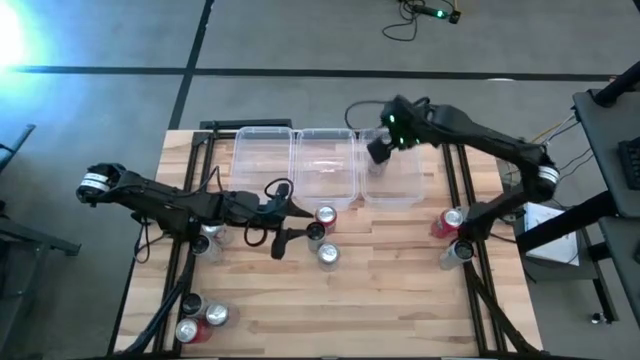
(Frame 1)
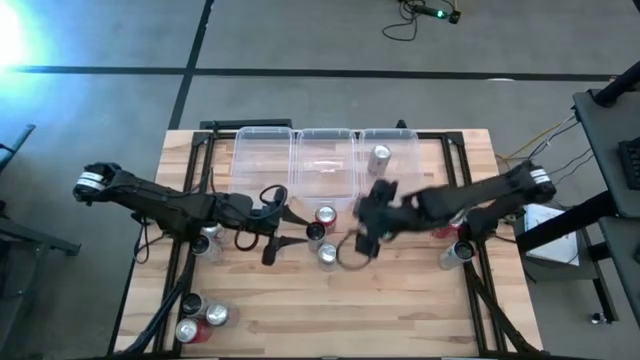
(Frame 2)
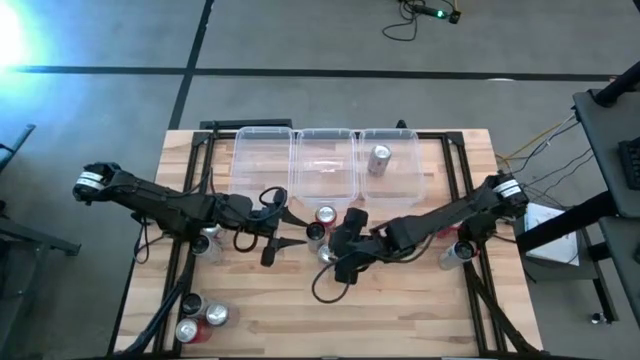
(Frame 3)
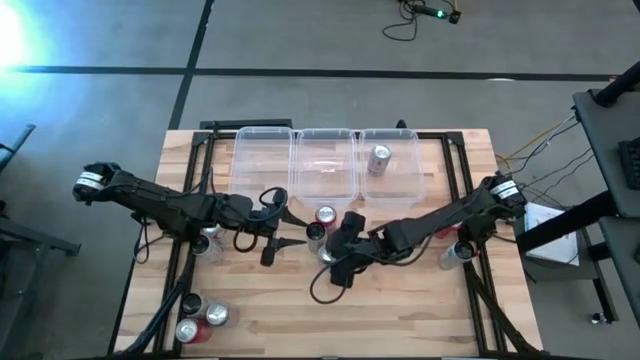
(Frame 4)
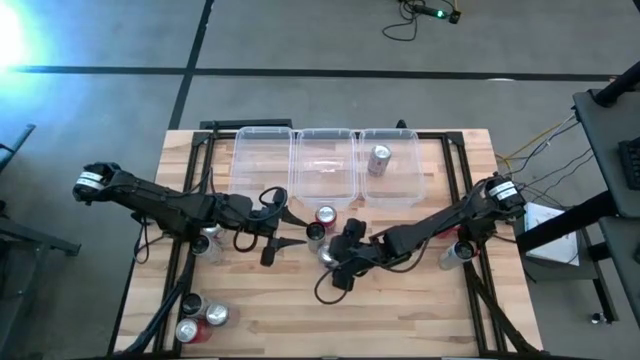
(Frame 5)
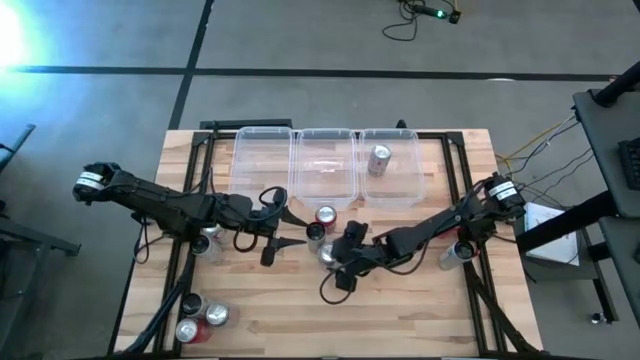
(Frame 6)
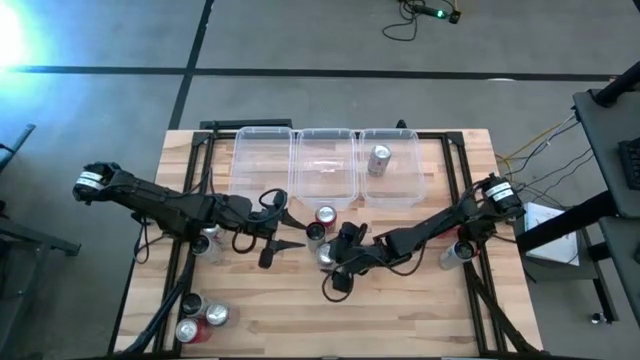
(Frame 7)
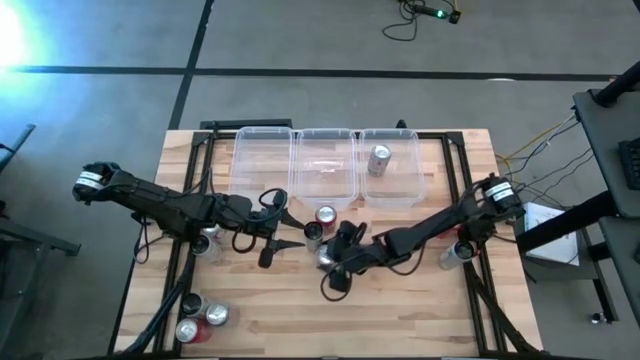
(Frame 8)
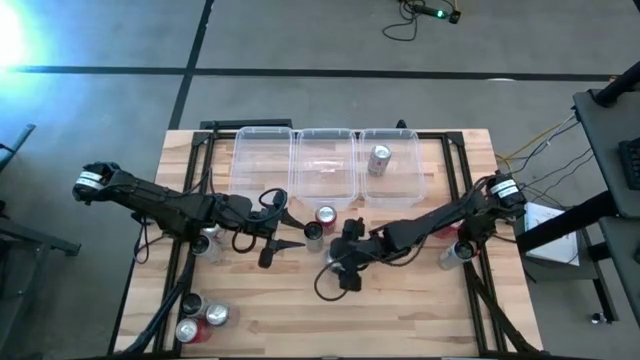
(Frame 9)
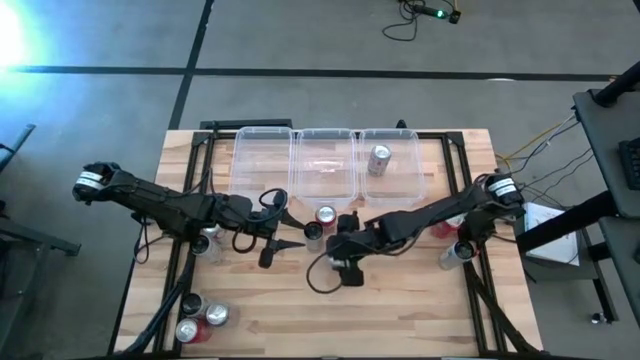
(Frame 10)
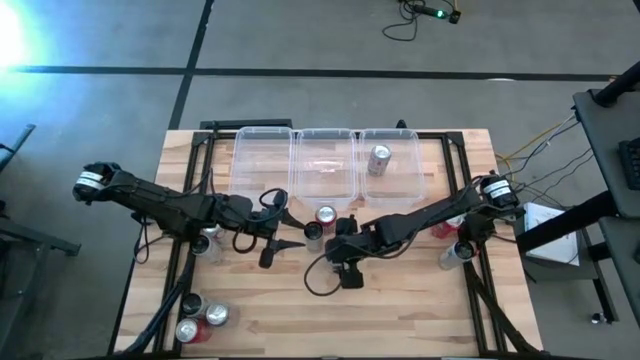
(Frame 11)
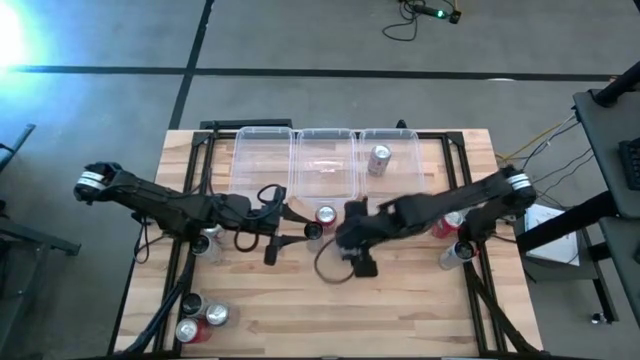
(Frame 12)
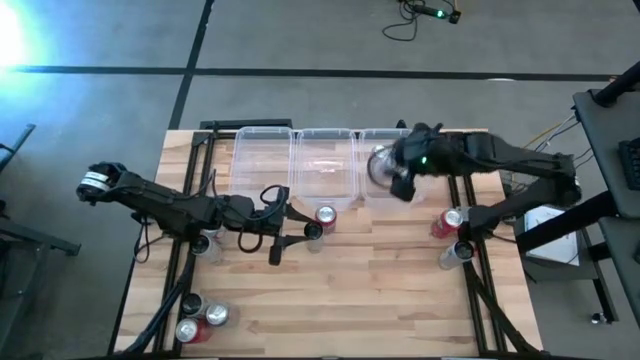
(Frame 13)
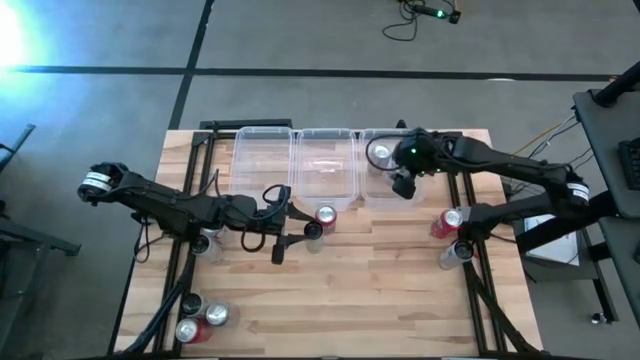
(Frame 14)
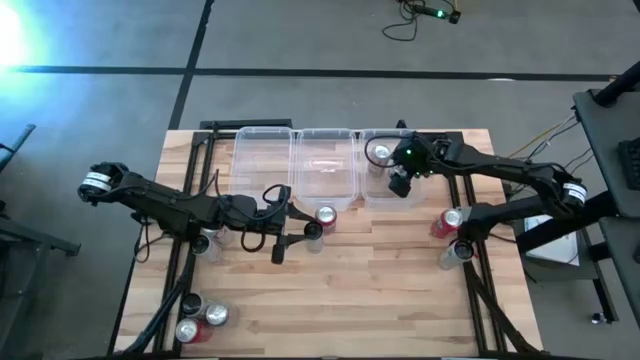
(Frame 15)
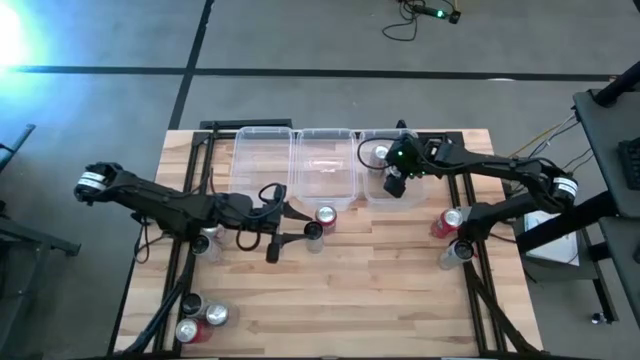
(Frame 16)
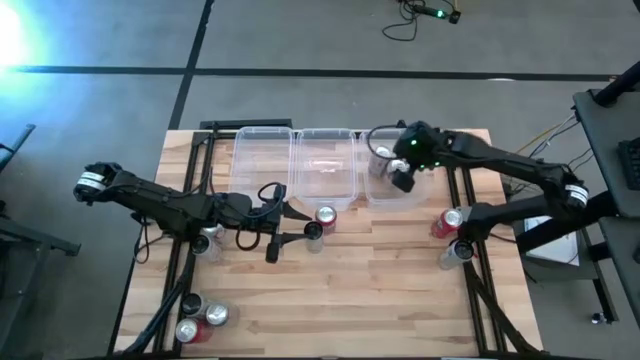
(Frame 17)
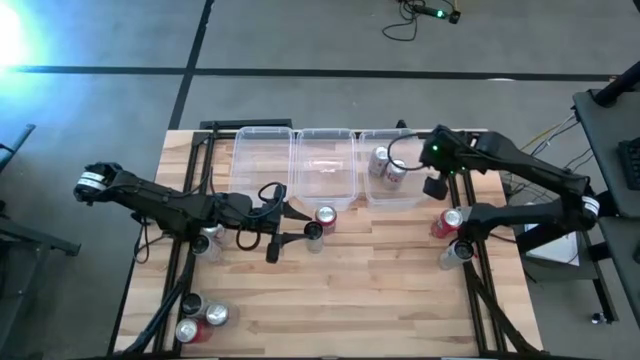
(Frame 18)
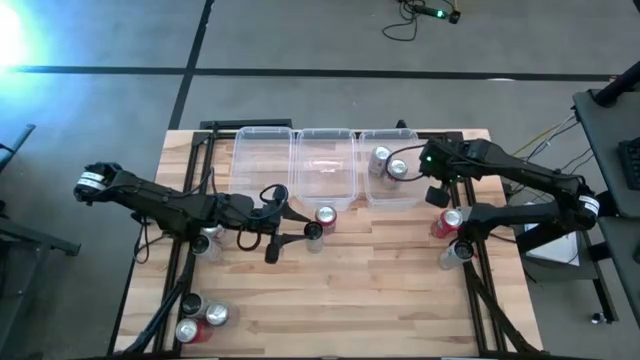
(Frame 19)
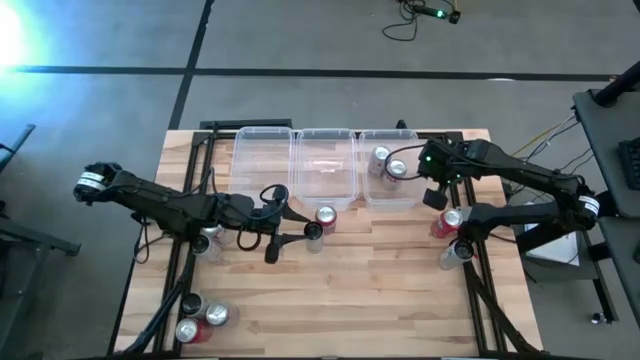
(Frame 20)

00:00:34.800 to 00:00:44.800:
Task: Sort soda cans
Put the top right red silver soda can into the right transparent bin

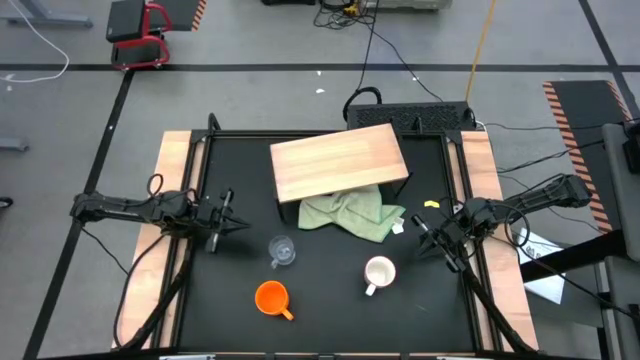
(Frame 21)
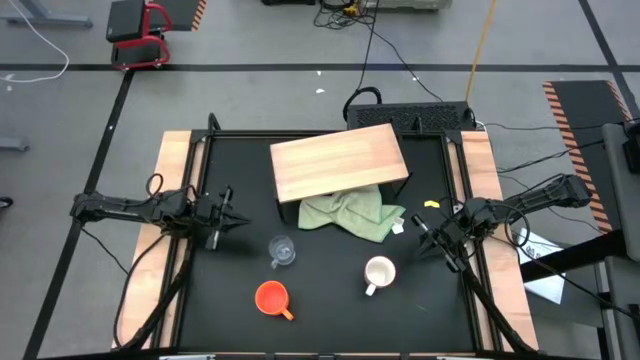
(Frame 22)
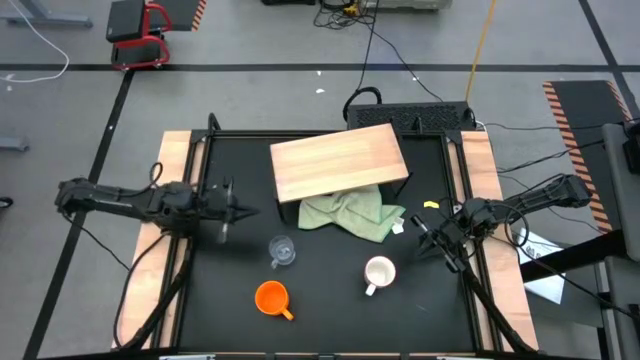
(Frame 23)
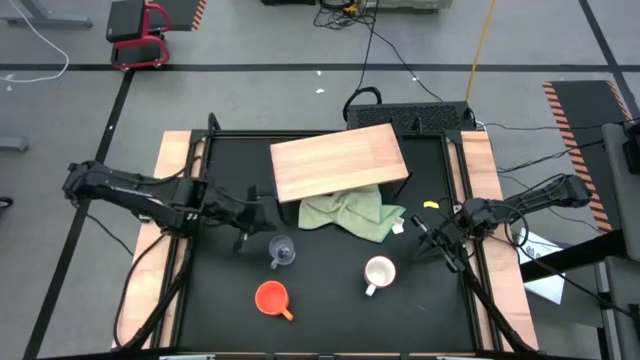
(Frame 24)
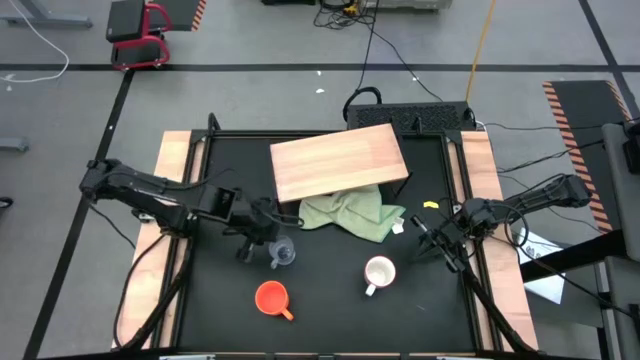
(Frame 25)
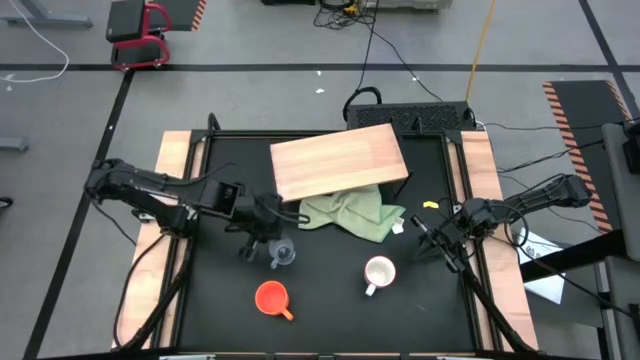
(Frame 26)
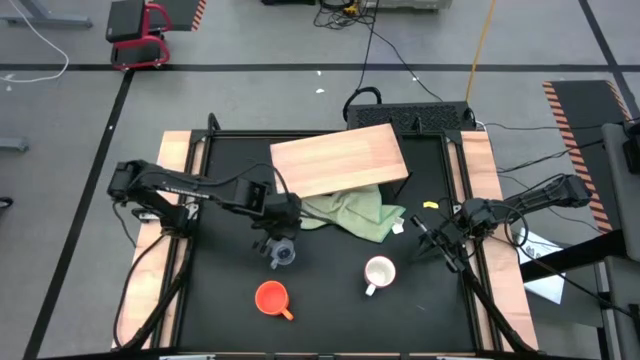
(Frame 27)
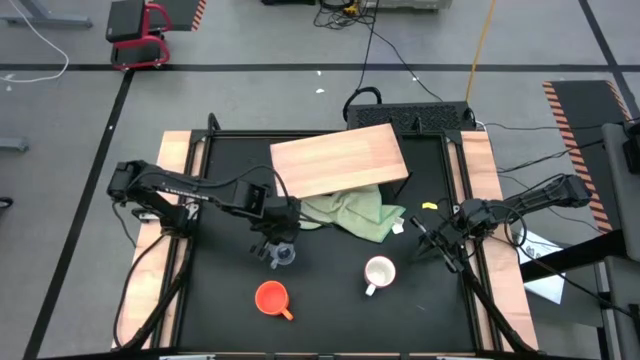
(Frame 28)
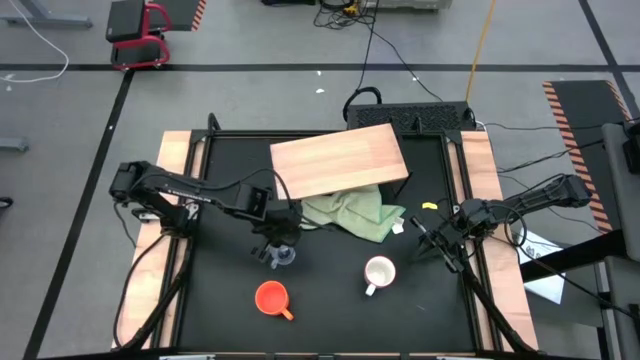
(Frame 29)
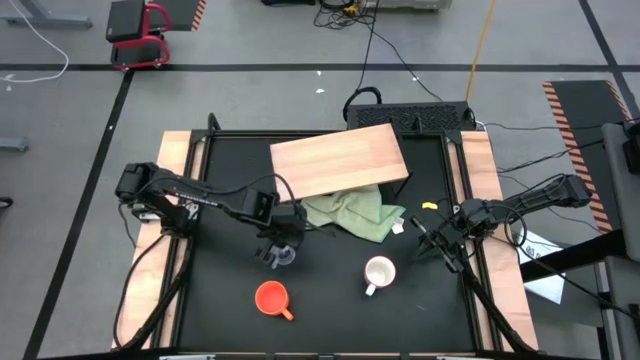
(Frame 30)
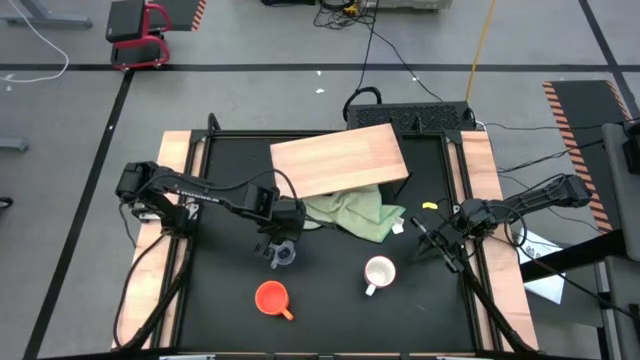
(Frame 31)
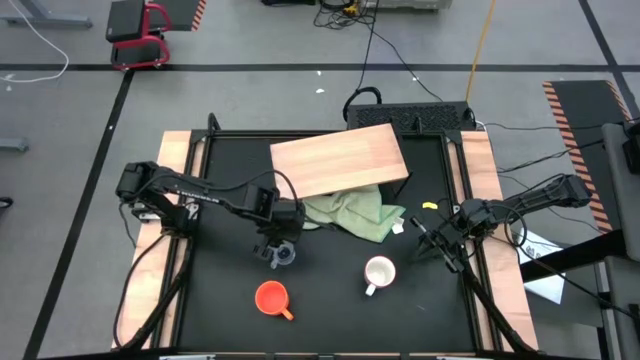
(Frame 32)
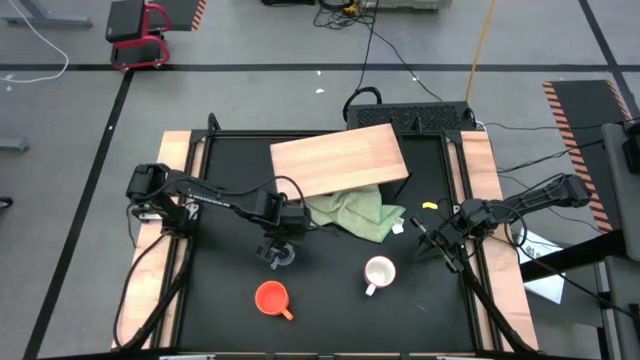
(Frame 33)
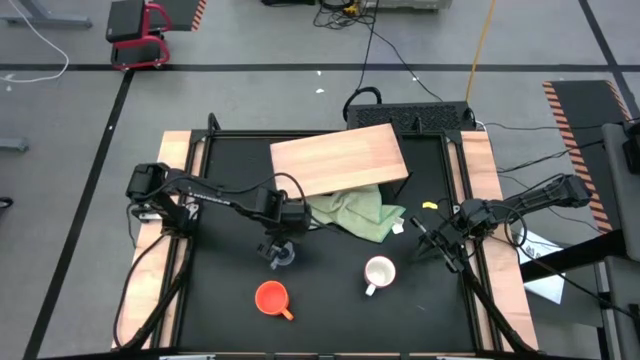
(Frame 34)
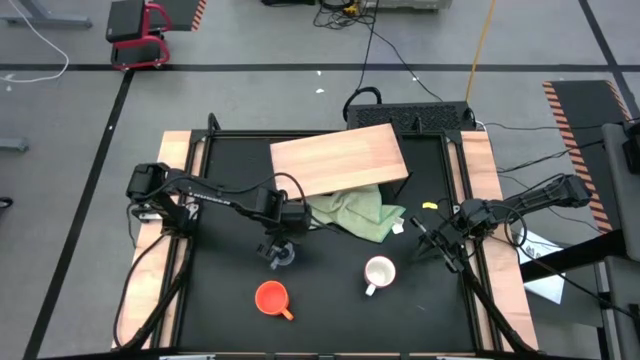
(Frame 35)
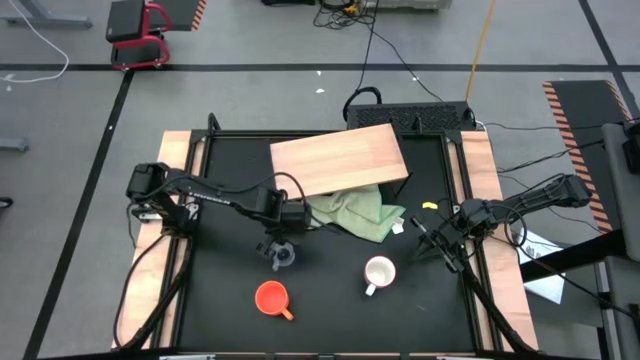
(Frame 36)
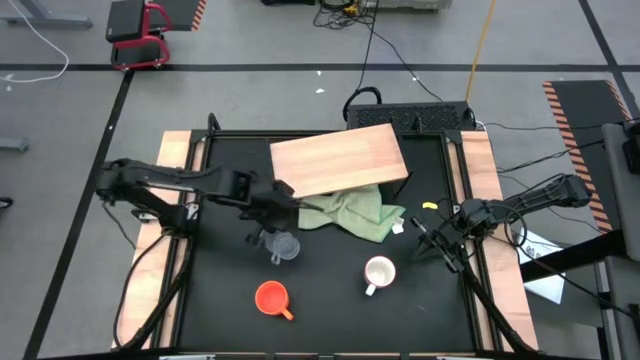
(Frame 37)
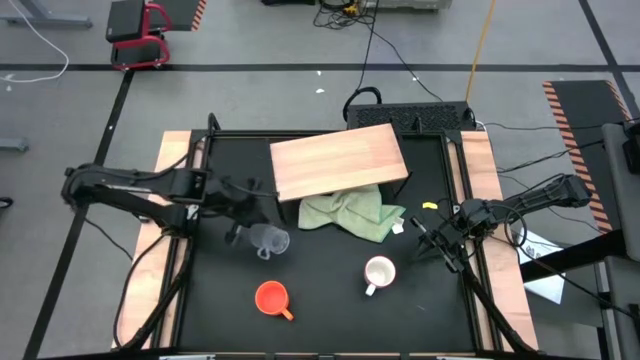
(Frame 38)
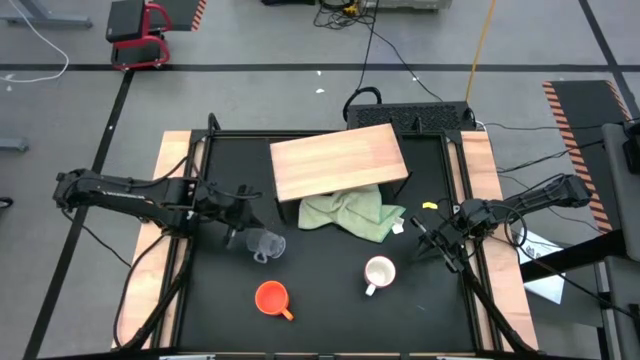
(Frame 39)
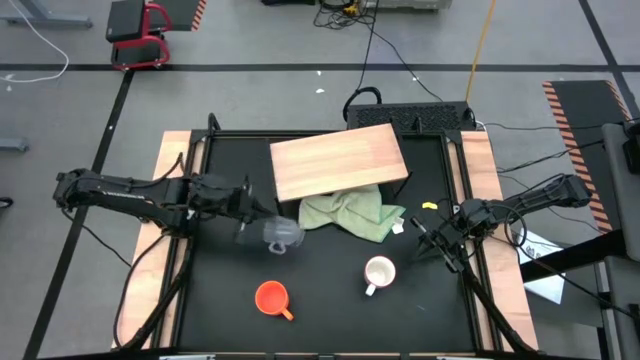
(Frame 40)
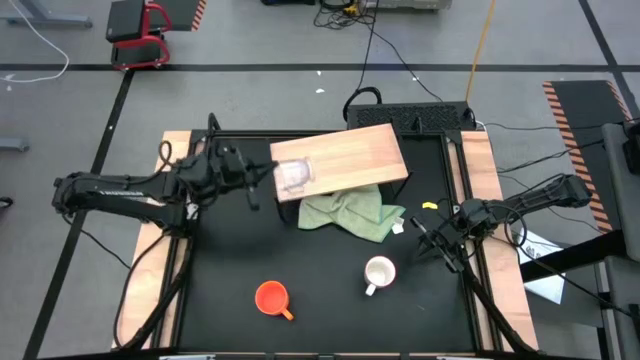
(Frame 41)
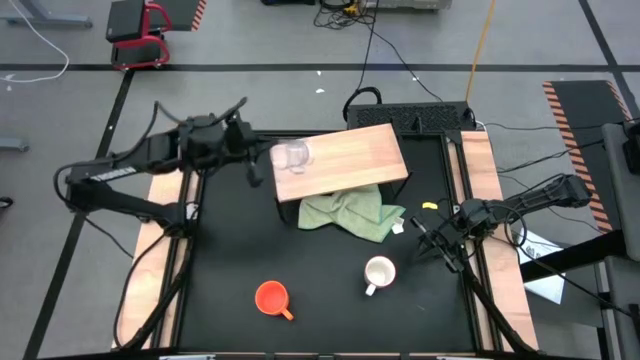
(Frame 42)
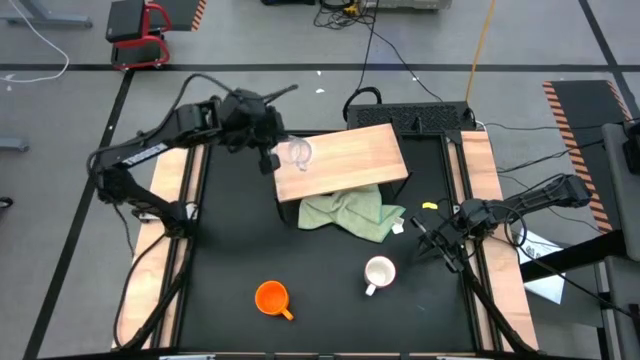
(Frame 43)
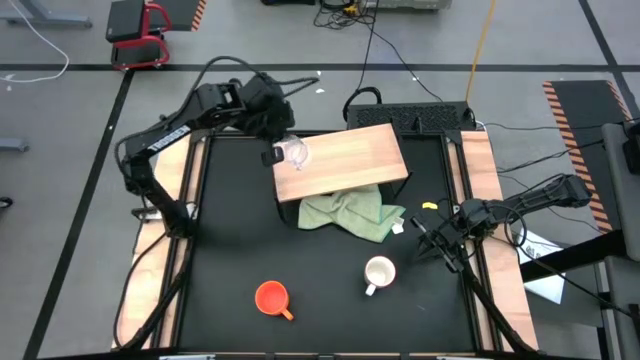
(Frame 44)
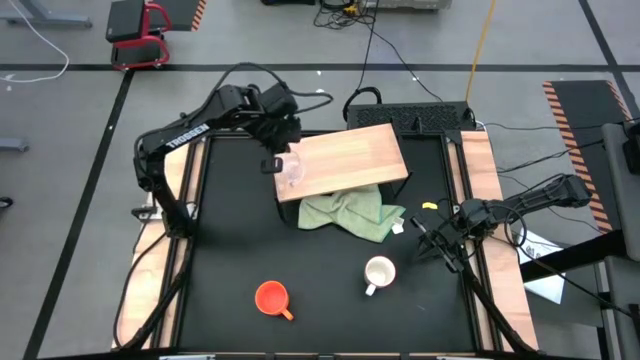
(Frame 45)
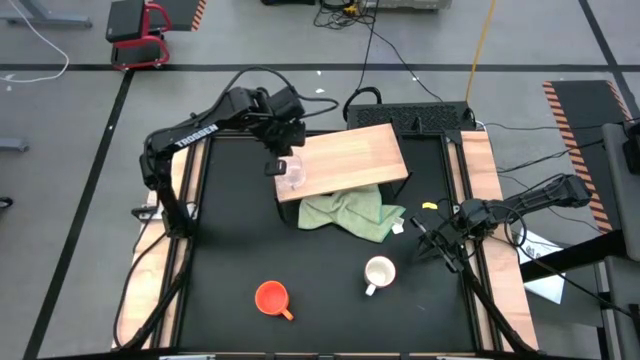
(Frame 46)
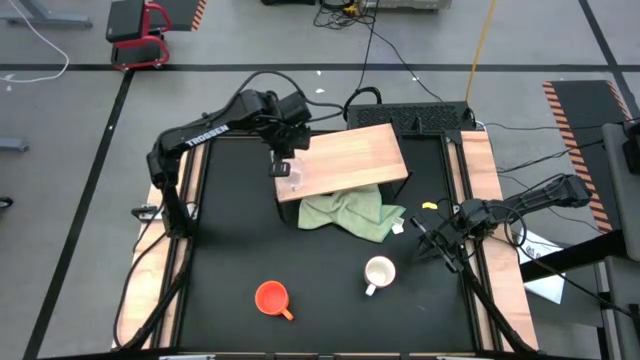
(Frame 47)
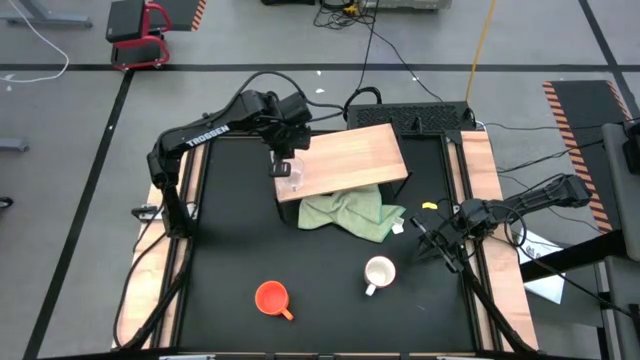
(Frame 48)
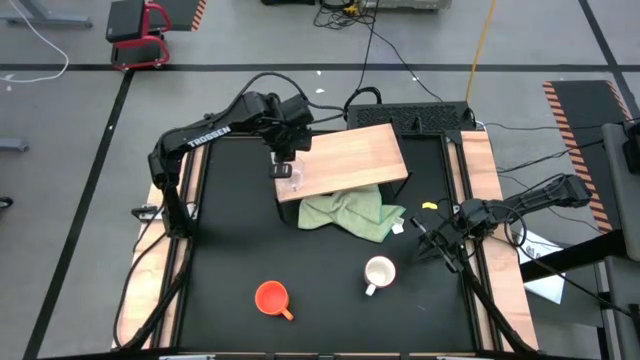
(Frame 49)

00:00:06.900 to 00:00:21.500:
Task: Stack small to large cups/mugs on shelf
Put the transparent mug on the shelf
